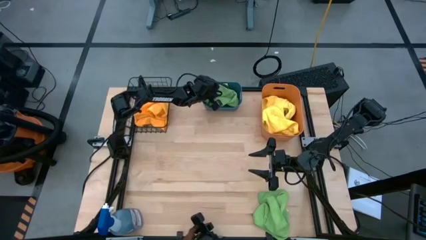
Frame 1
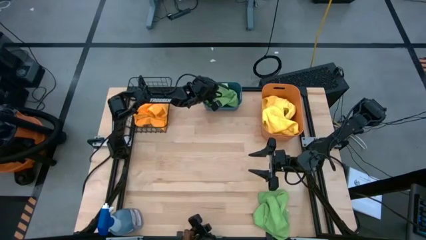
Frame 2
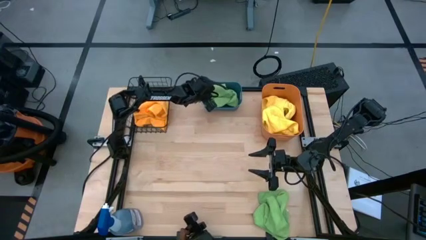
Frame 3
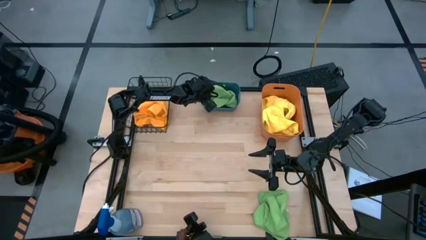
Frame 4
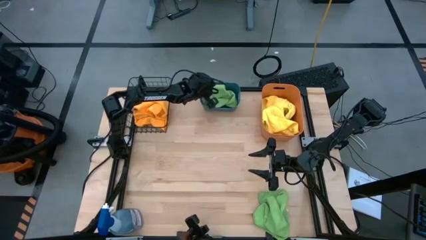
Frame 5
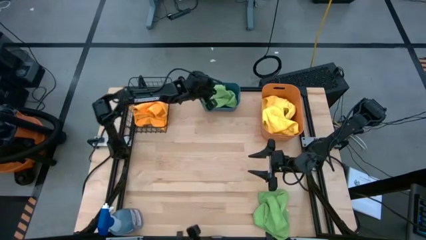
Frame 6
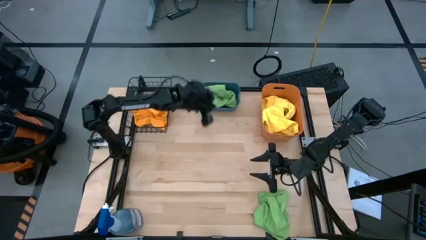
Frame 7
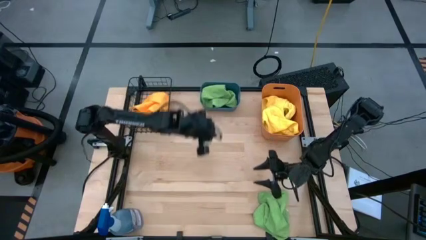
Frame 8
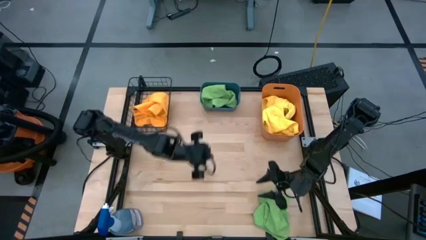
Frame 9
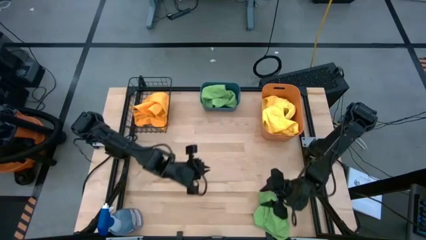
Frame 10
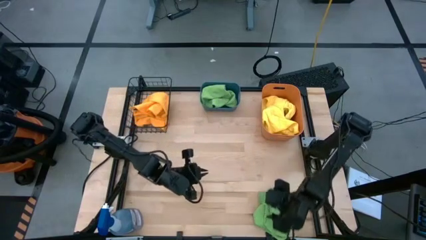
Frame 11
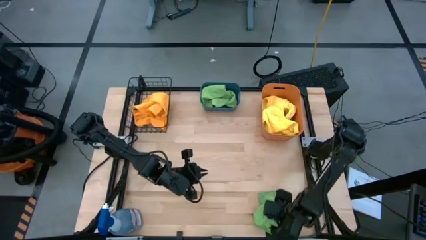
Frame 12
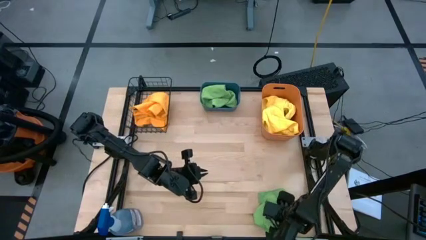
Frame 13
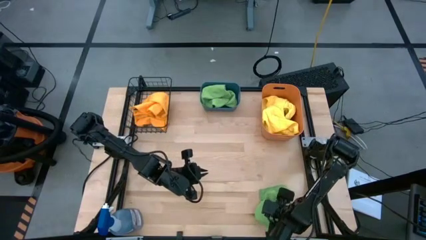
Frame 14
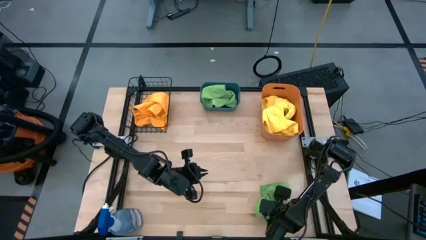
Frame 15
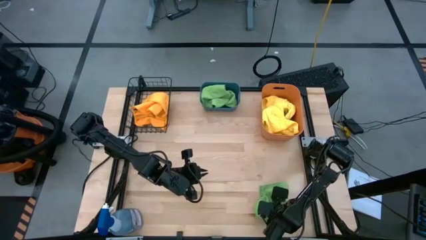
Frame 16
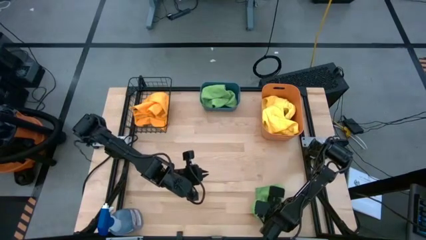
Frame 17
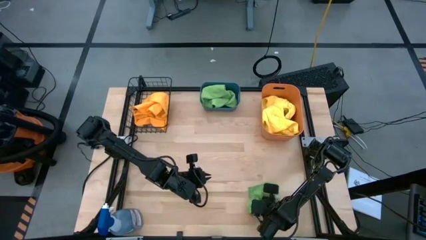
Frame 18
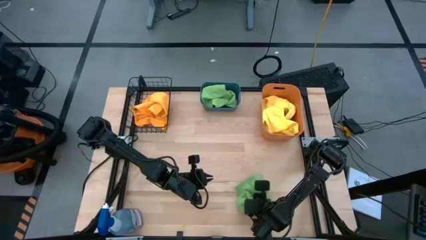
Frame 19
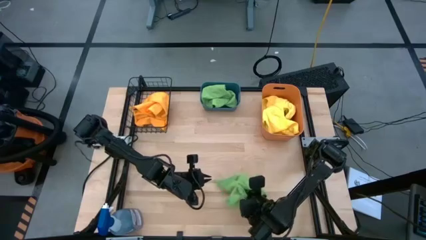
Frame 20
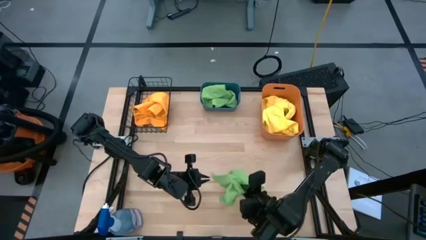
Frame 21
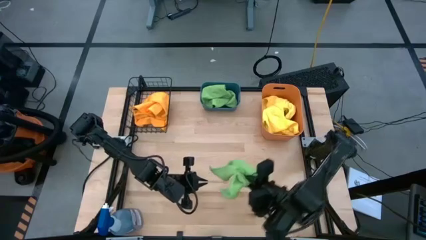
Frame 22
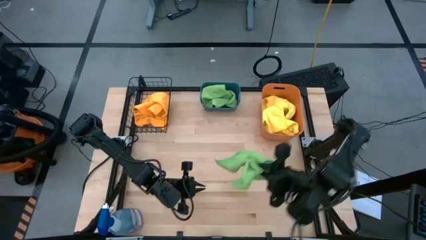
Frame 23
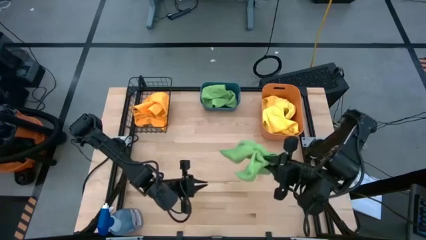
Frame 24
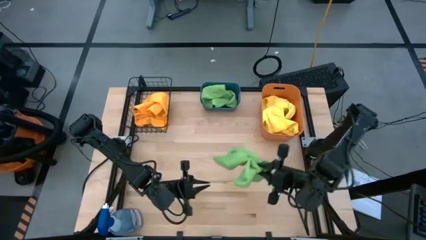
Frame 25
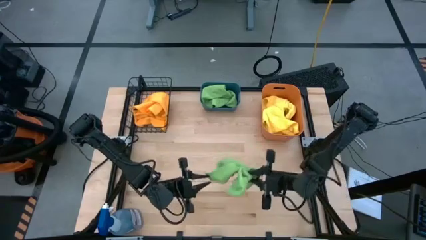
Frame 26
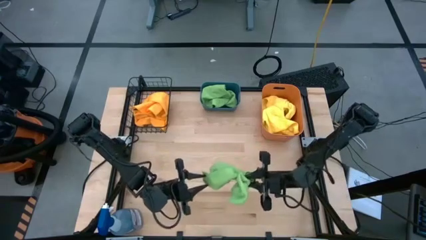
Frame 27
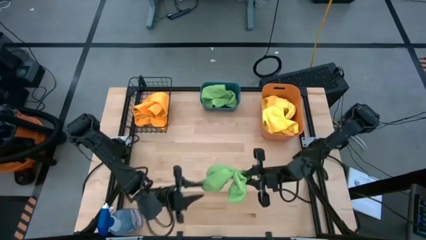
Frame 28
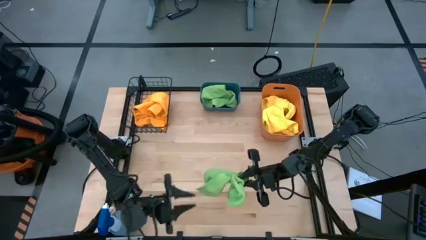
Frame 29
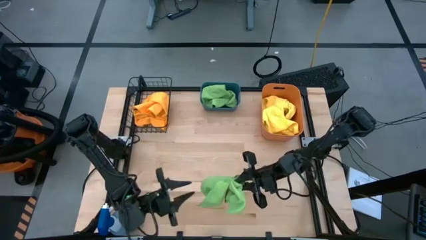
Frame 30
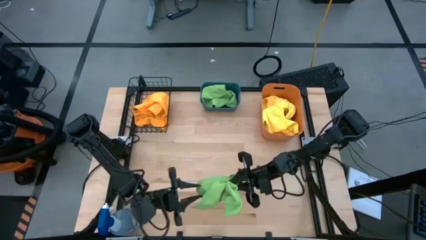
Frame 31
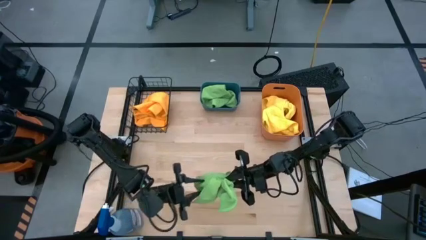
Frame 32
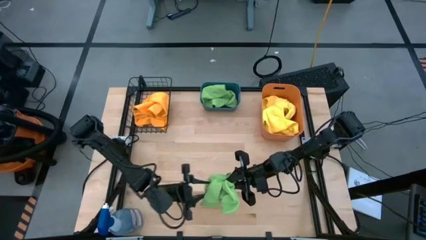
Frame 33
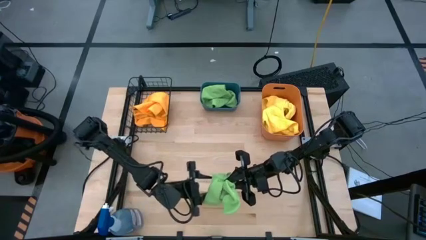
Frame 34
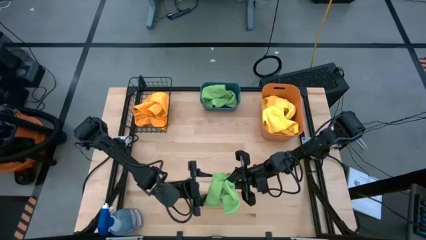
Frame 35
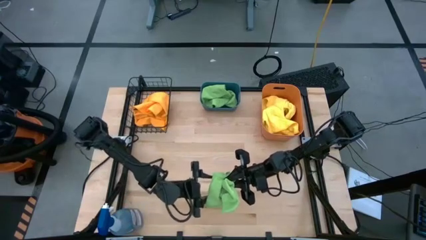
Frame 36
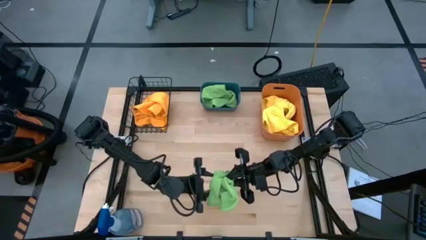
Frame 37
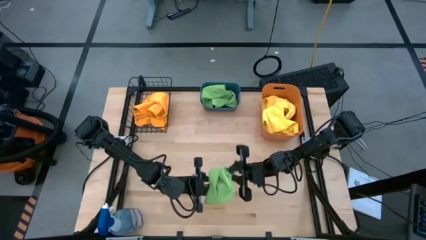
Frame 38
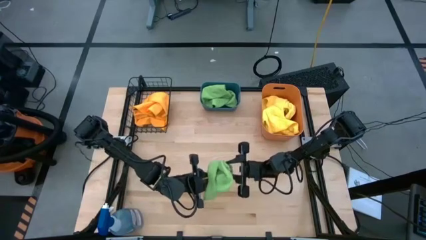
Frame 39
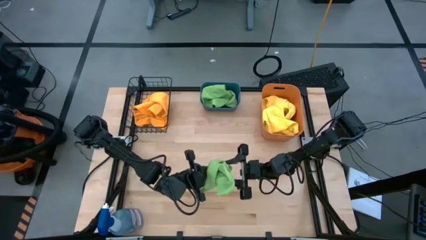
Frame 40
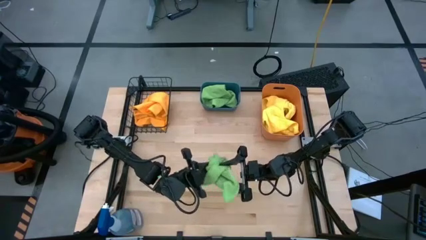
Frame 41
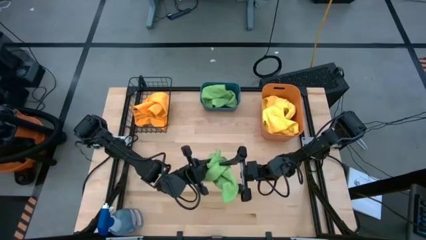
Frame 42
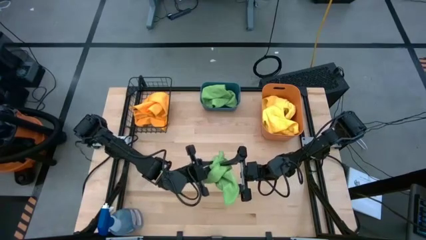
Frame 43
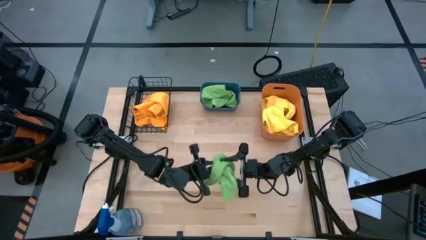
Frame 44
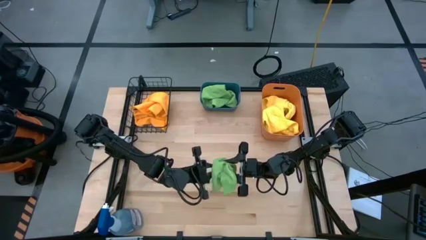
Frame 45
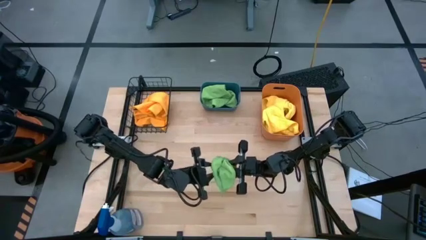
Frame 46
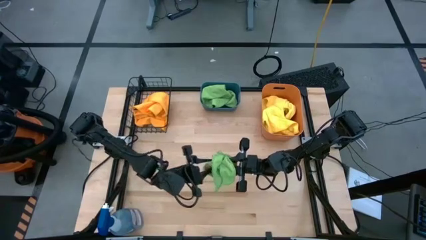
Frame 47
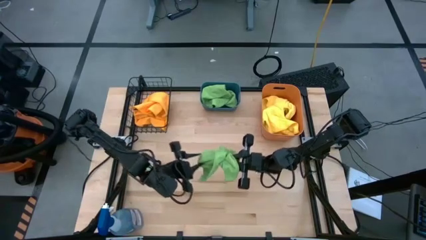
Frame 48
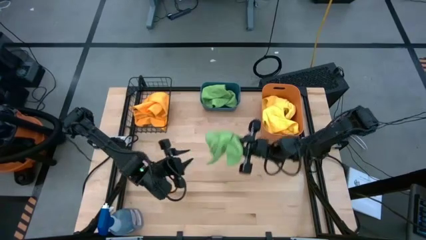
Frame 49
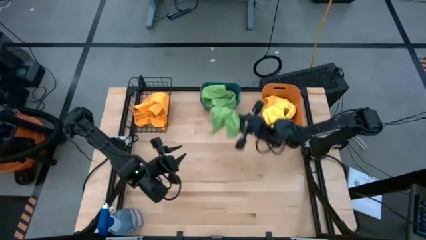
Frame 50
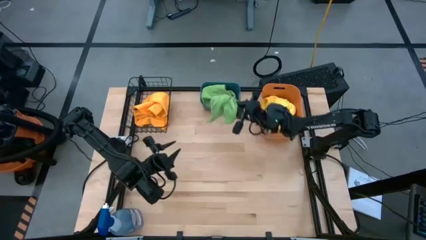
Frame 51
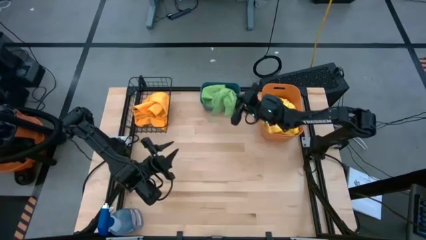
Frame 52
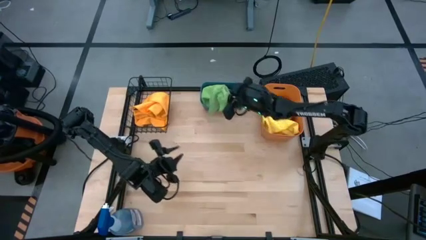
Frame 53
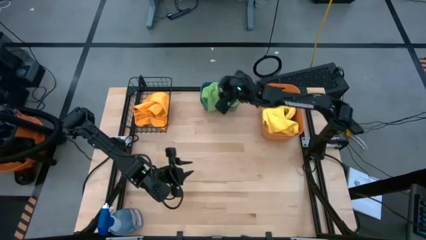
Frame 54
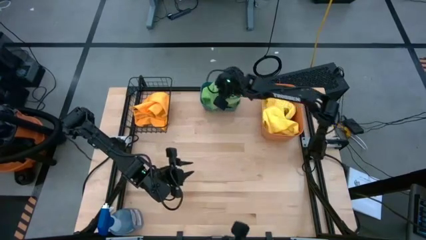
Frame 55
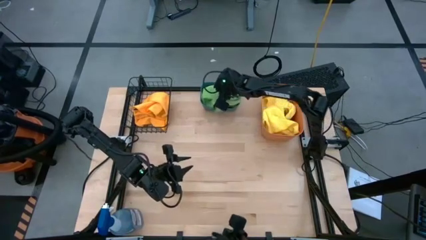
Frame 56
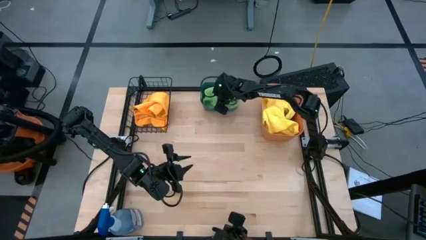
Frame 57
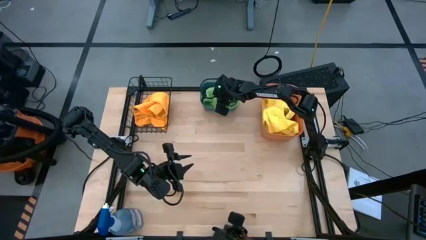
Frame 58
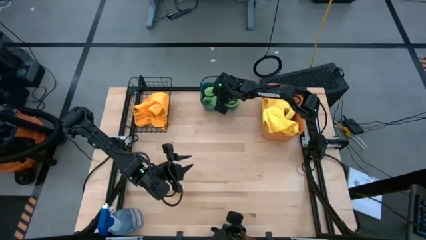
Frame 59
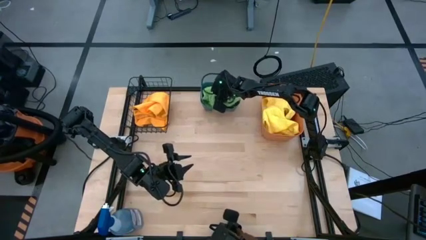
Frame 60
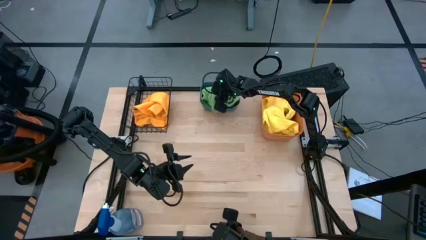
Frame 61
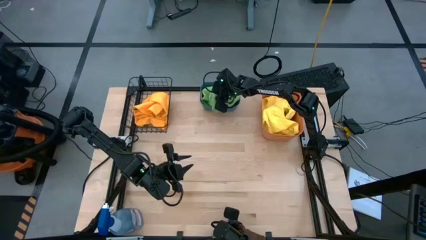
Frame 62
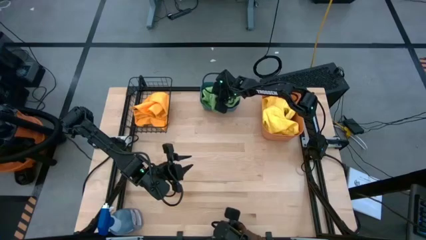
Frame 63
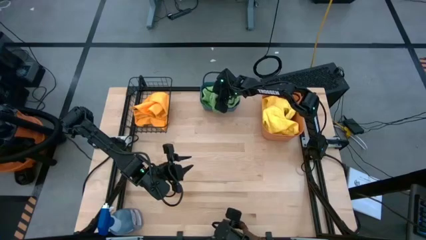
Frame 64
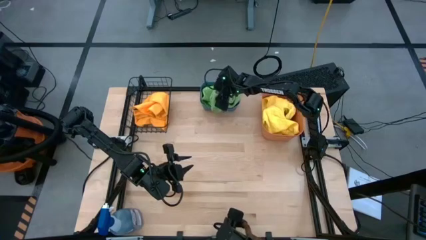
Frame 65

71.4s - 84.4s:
Task: Sort microfiber towel by color & place in baskets
Put the green microfiber cloth into the blue bin
